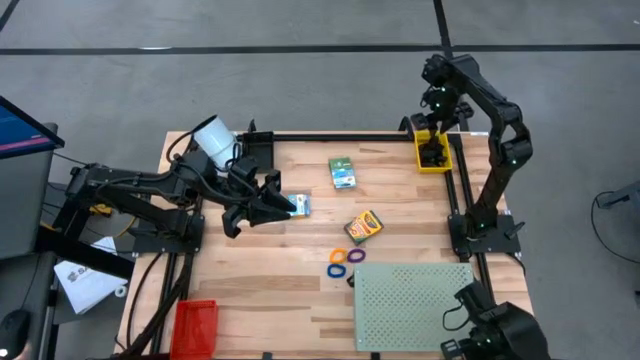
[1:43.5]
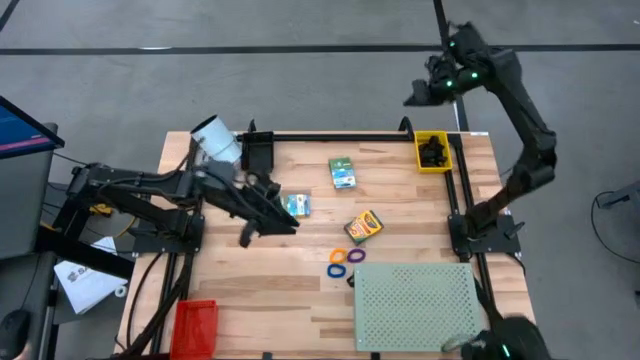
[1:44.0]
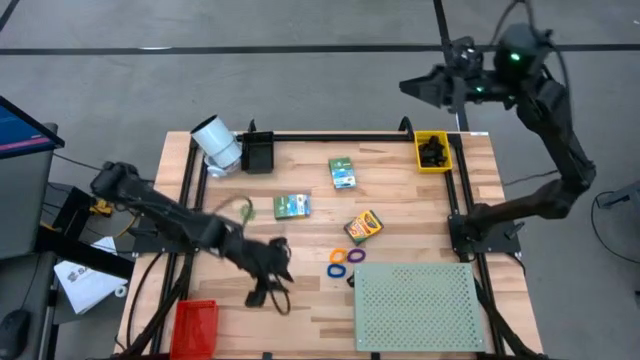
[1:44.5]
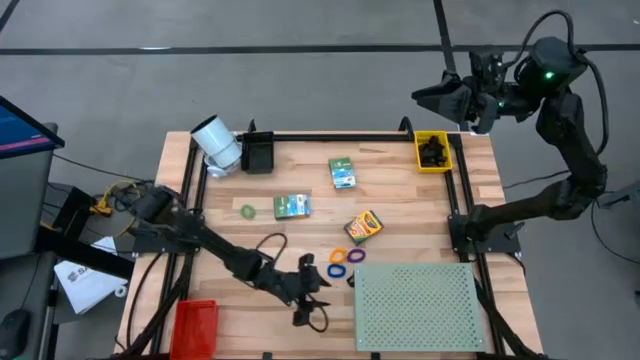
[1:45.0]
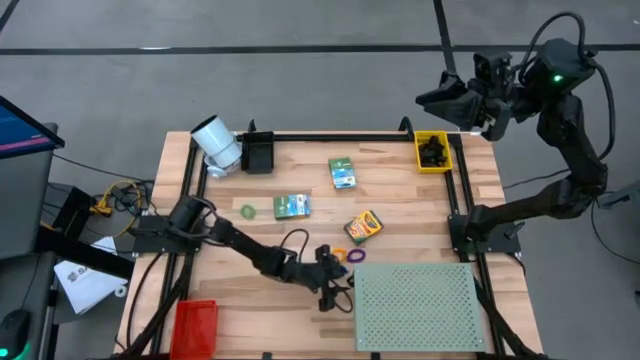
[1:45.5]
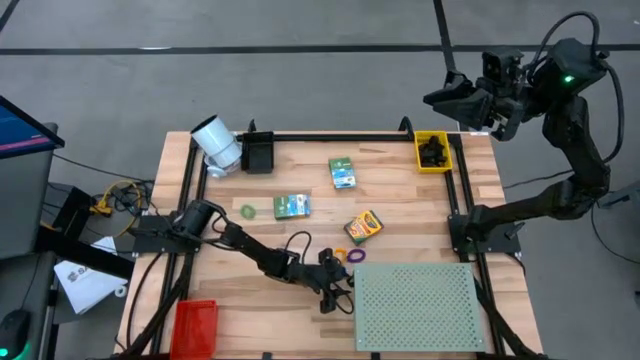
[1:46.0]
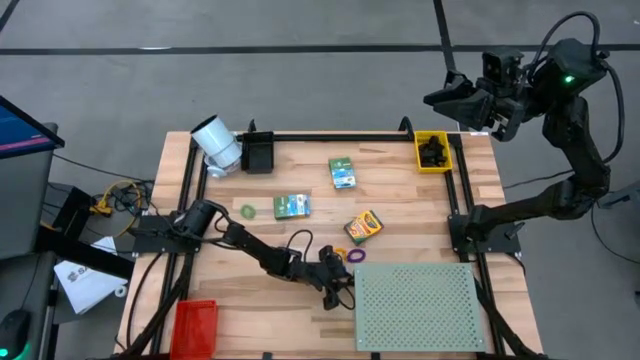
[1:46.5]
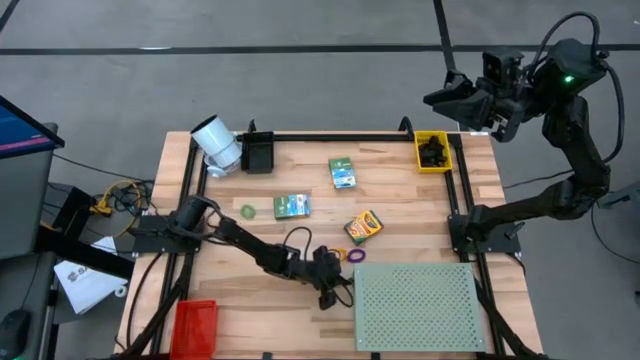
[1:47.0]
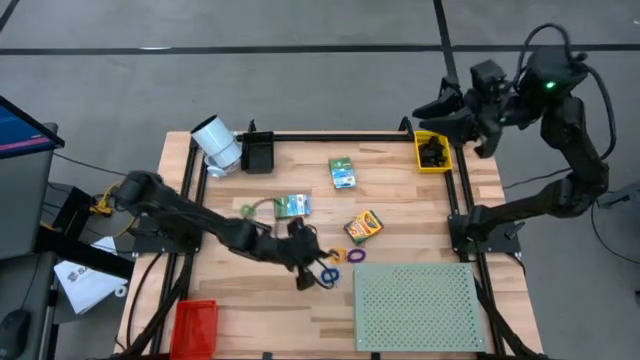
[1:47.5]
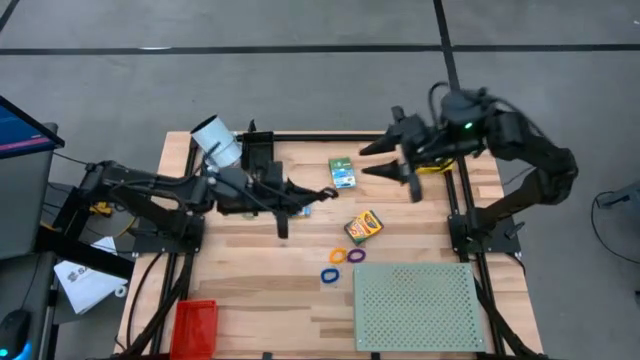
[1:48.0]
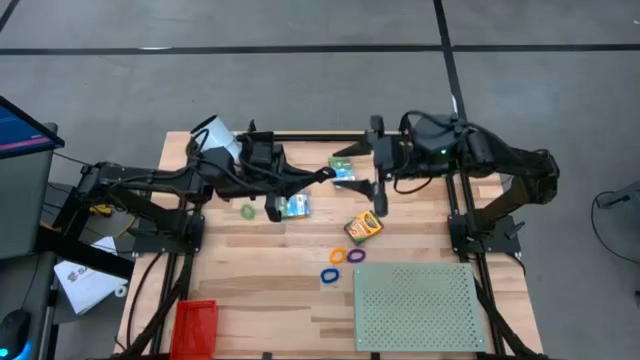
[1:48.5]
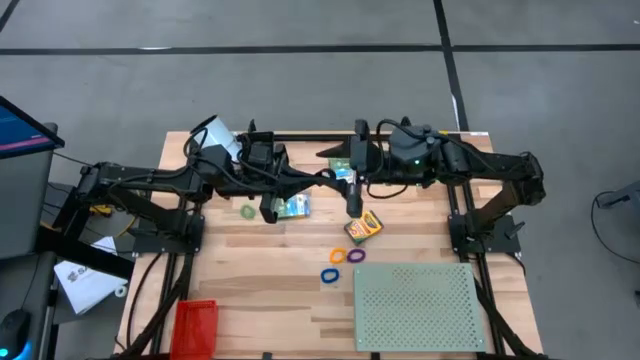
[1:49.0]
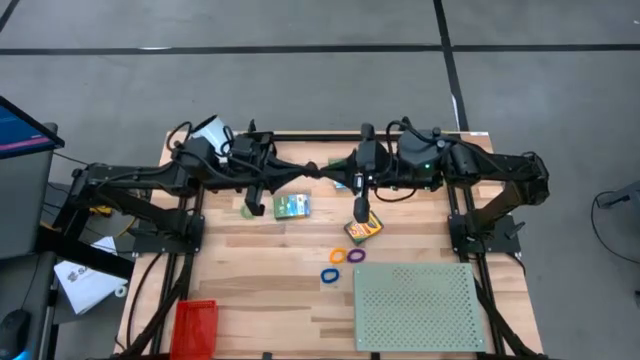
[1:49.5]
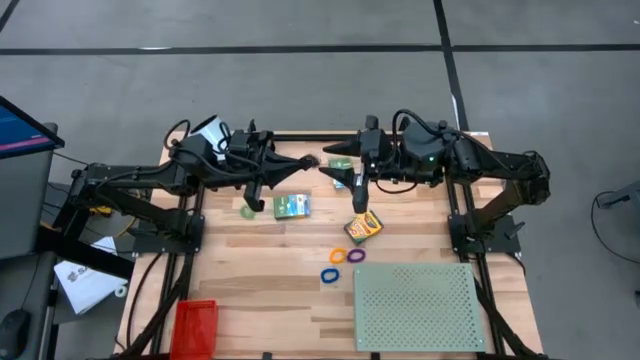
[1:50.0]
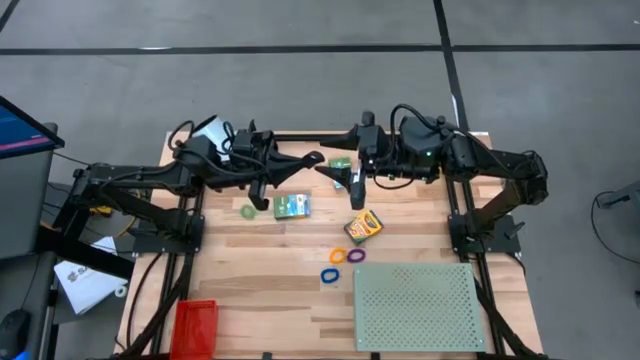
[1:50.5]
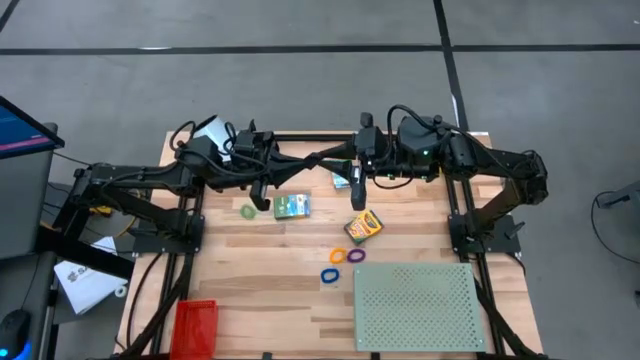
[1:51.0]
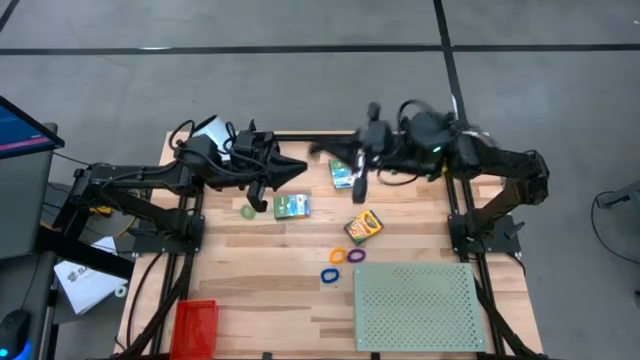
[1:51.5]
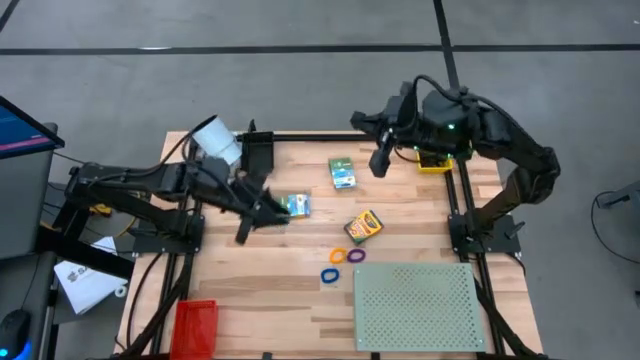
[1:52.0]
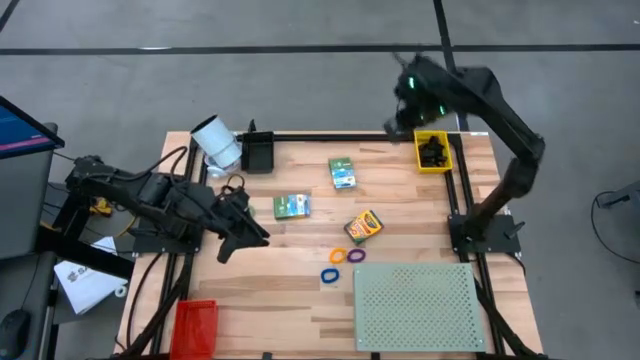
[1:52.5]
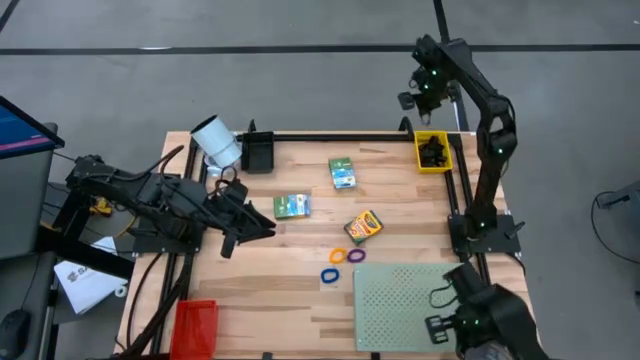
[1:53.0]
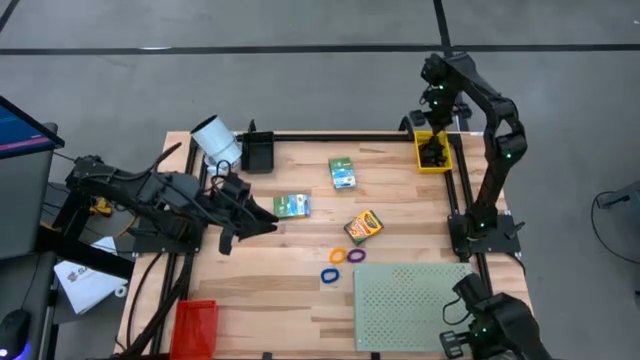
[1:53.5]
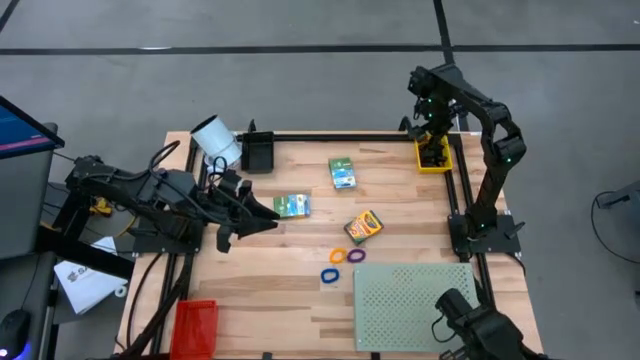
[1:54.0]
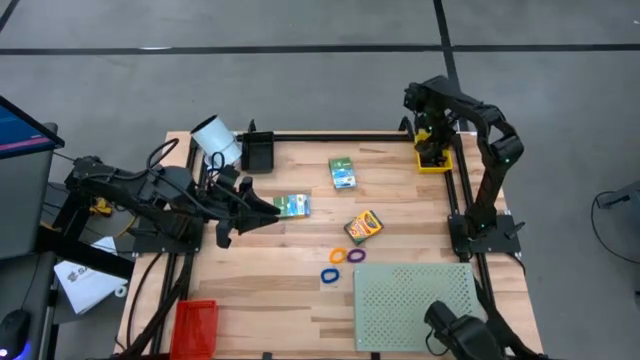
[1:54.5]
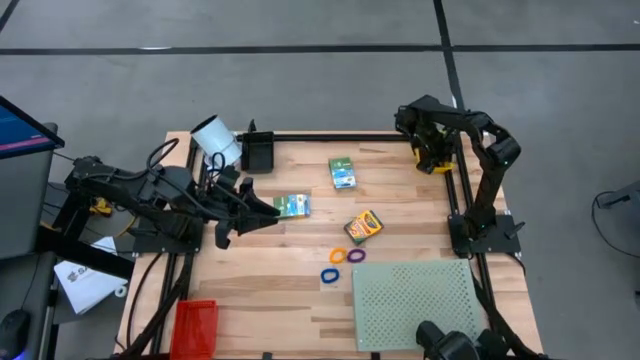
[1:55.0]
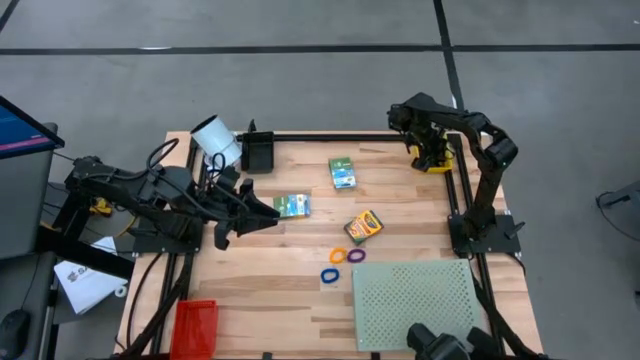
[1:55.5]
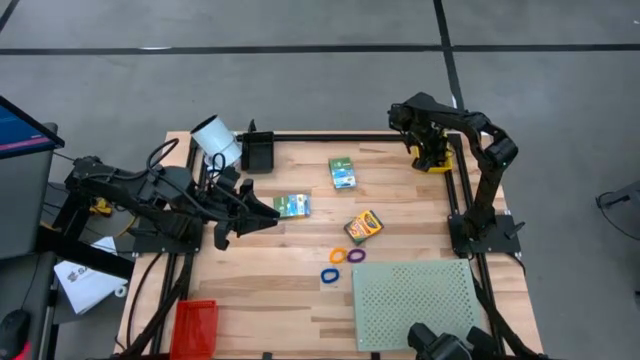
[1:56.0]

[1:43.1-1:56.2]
Task: Pick & Place Office Desk Supplies
Put the black rubber band into the yellow bin

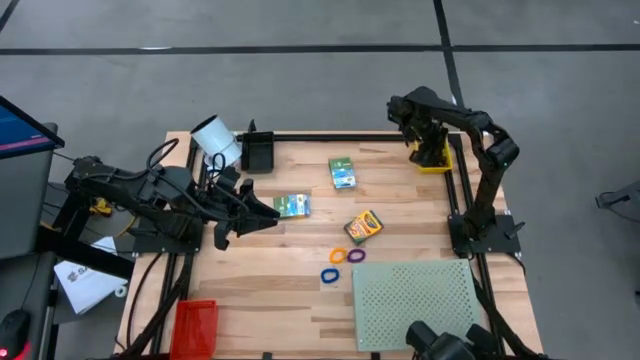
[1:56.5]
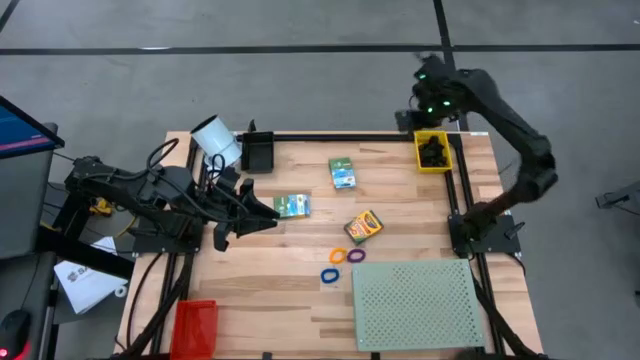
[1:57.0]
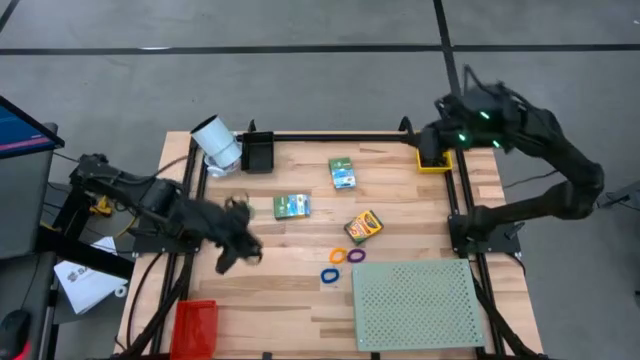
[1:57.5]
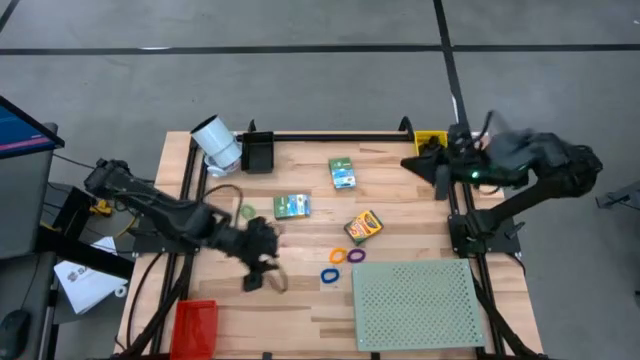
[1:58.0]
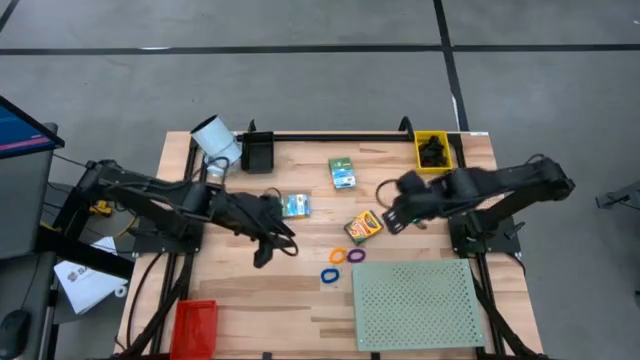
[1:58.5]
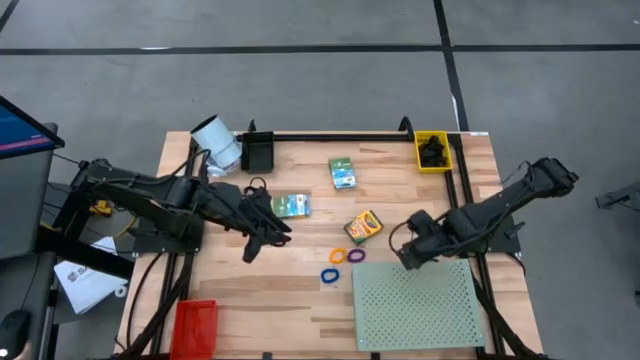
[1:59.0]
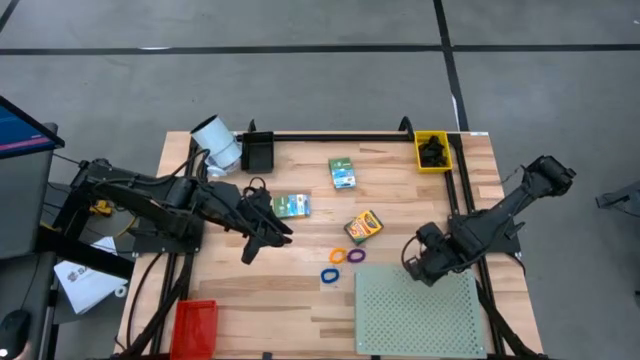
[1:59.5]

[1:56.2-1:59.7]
Adjust the shelf

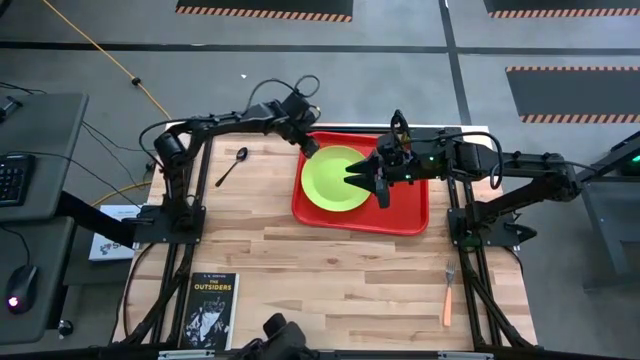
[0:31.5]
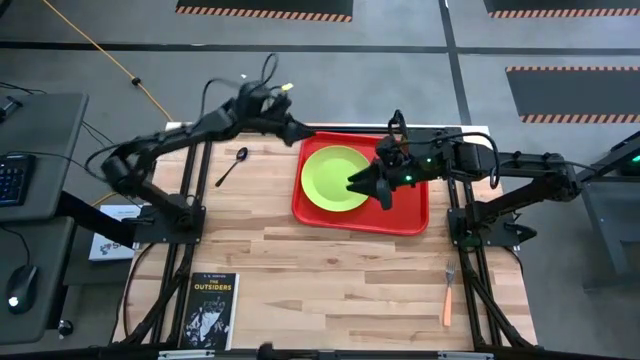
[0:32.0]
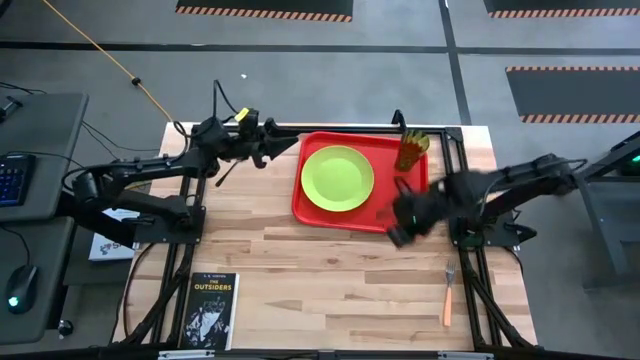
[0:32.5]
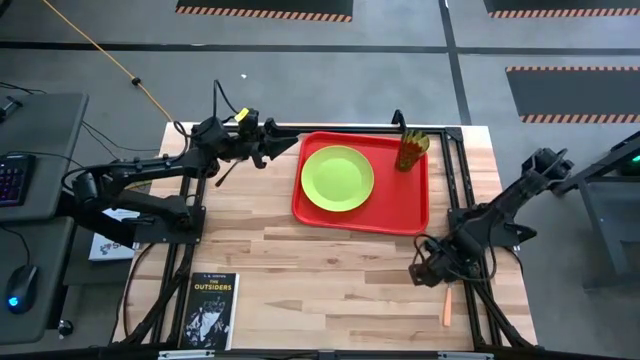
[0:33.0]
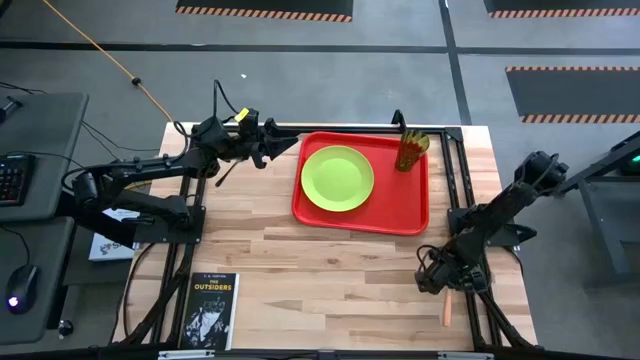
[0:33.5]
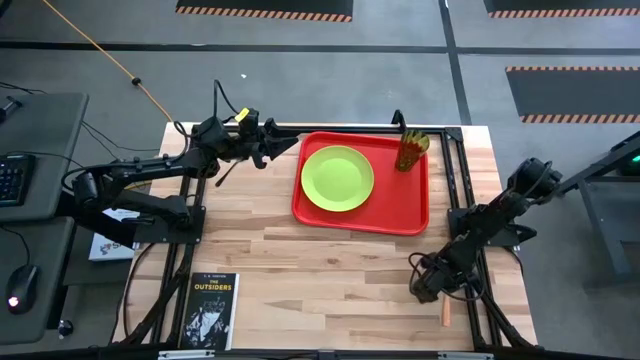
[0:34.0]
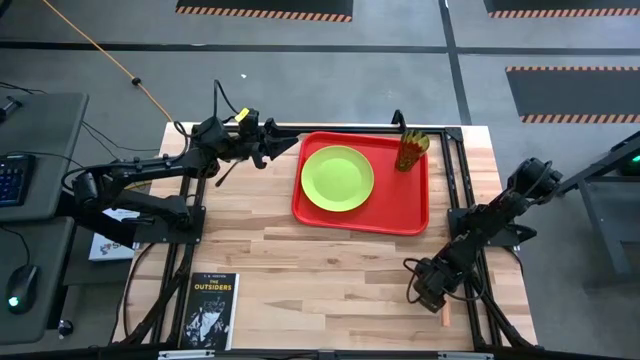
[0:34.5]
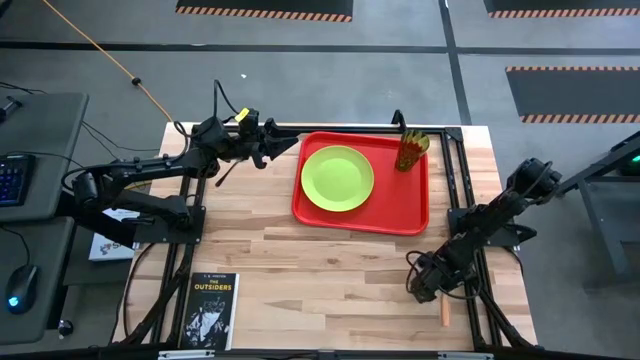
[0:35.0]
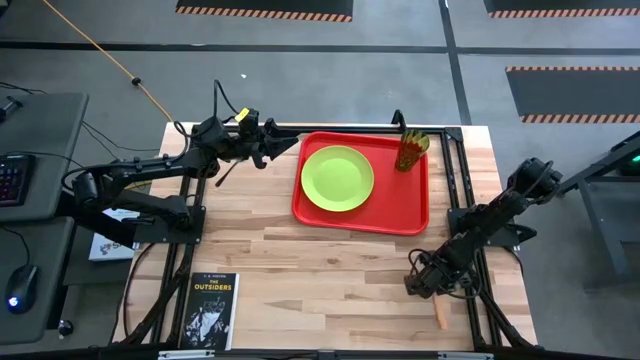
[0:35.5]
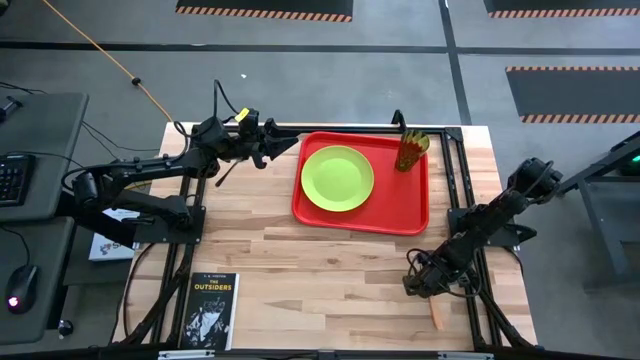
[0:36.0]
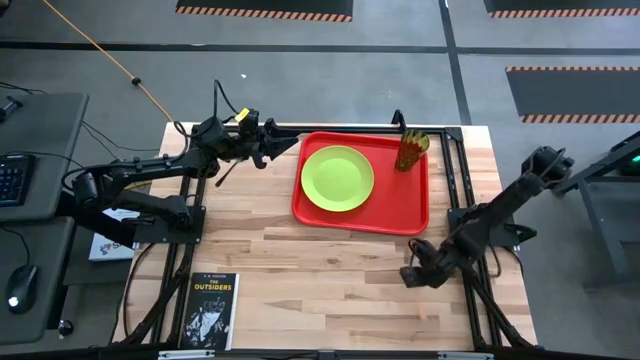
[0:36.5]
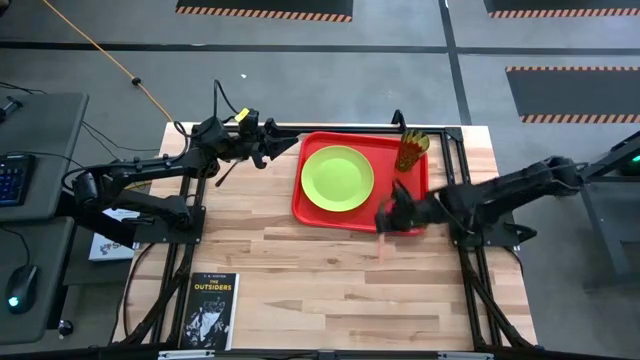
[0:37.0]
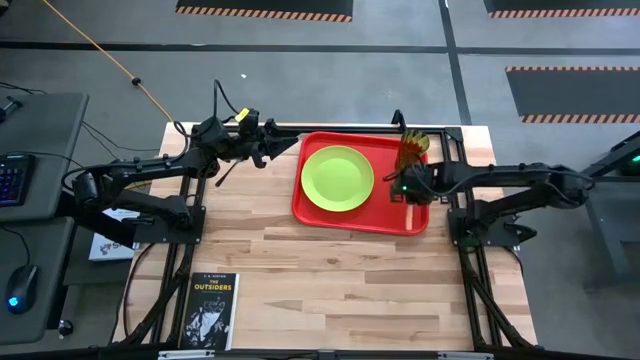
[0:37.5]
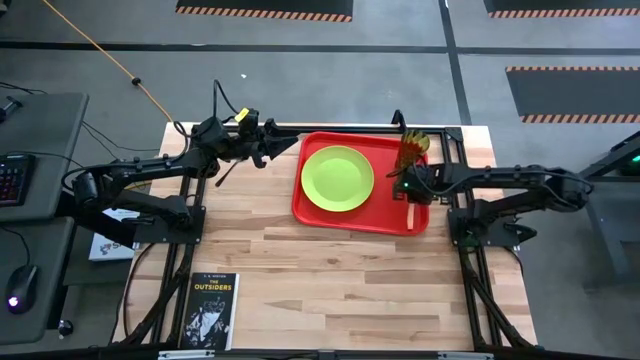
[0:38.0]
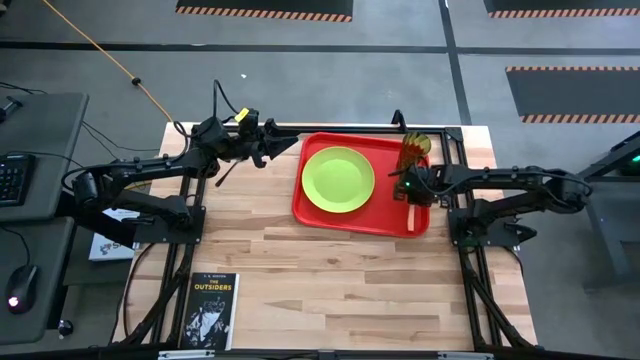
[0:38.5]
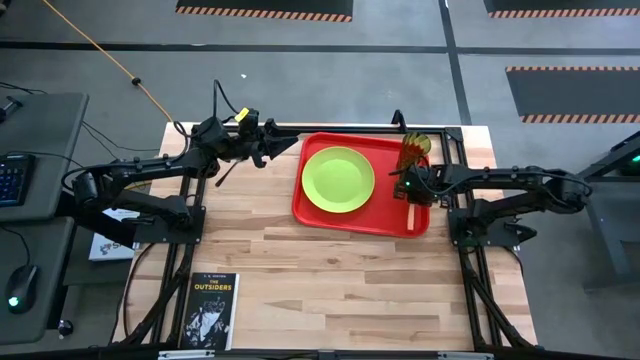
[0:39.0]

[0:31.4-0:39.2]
Task: Pick and place plate/cup/fork/spoon on tray
Put the orange fork at the bottom of the green cup on the red tray
